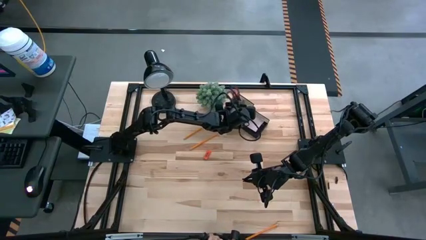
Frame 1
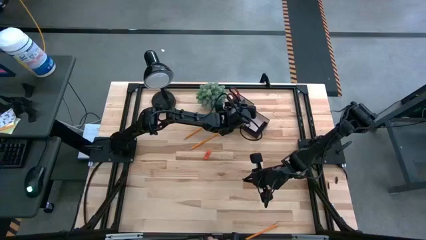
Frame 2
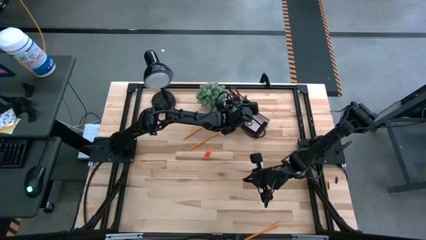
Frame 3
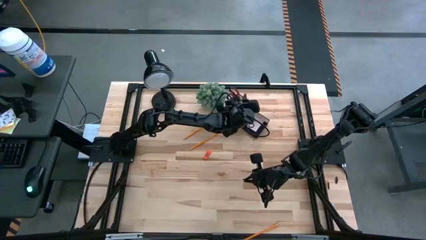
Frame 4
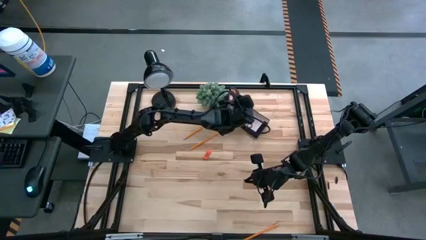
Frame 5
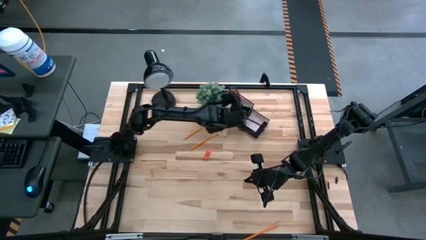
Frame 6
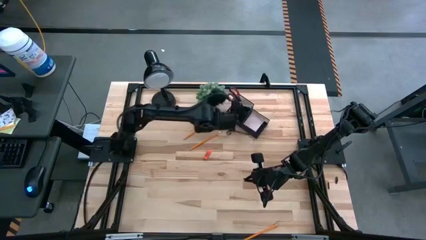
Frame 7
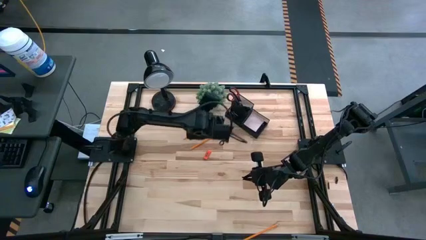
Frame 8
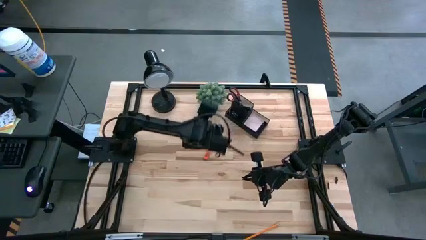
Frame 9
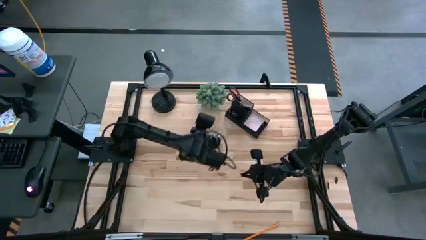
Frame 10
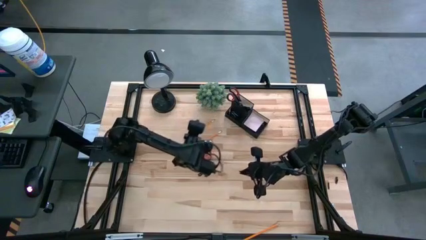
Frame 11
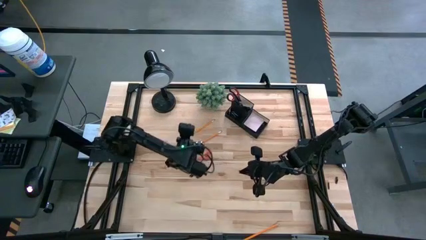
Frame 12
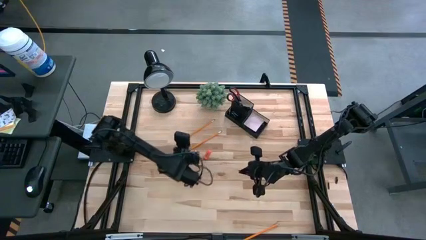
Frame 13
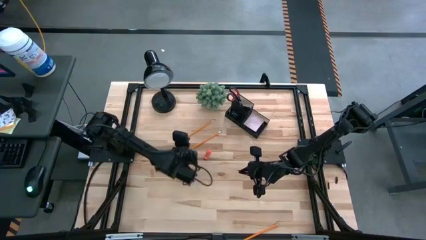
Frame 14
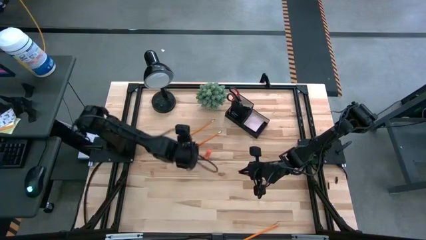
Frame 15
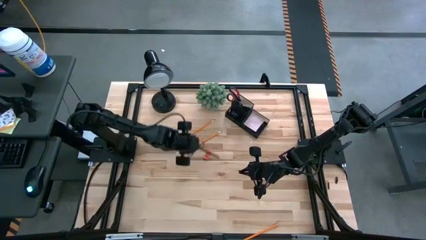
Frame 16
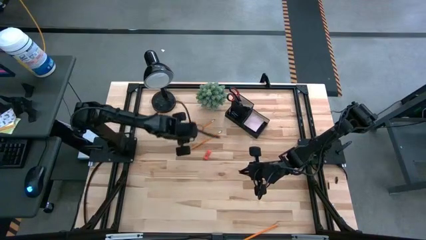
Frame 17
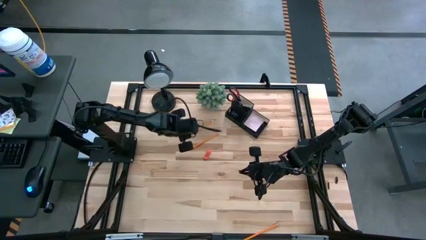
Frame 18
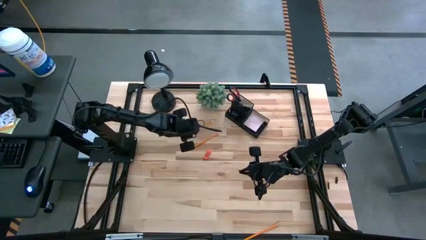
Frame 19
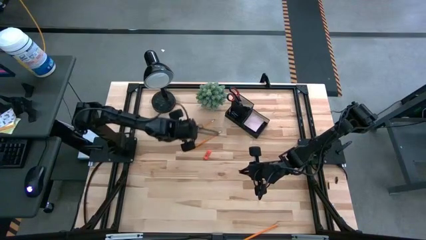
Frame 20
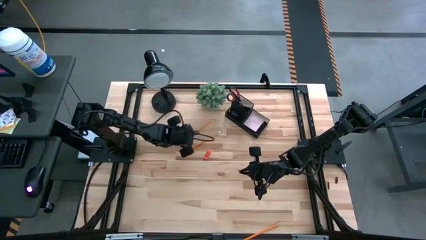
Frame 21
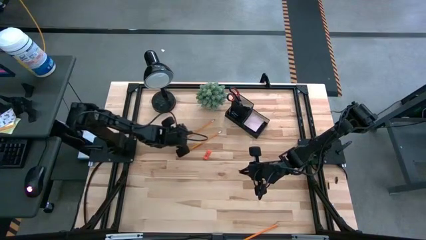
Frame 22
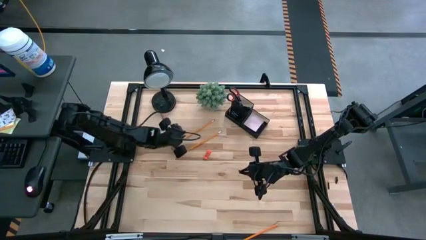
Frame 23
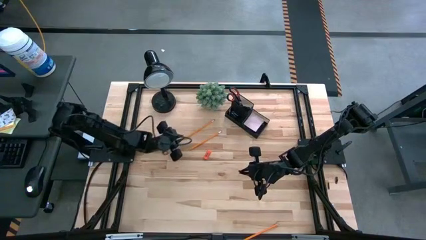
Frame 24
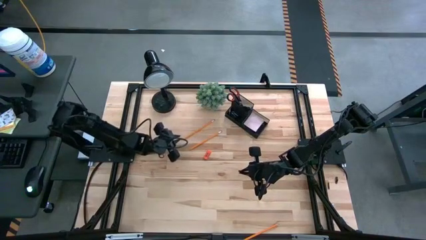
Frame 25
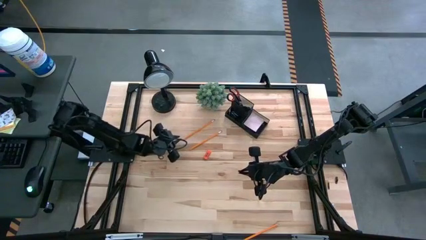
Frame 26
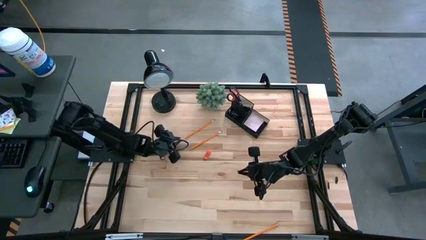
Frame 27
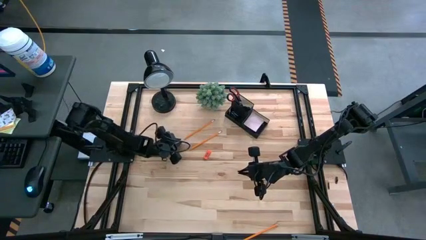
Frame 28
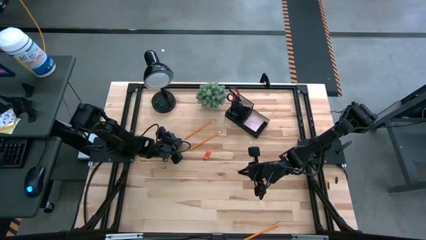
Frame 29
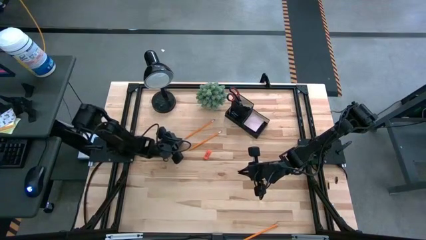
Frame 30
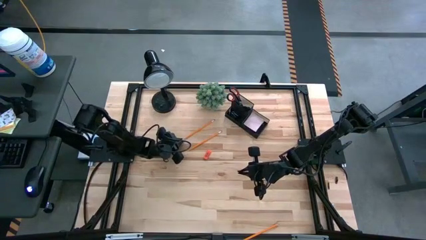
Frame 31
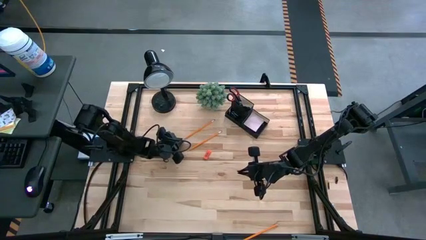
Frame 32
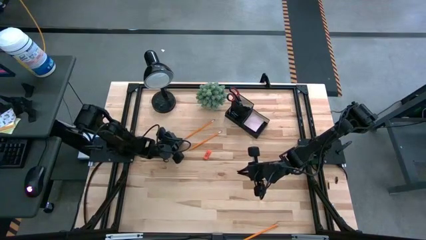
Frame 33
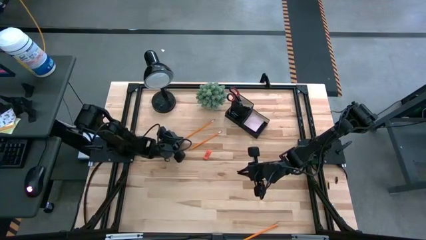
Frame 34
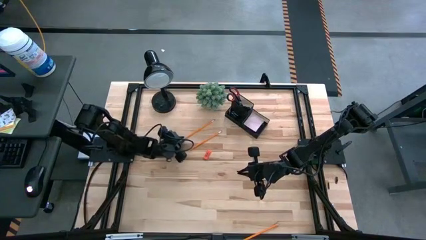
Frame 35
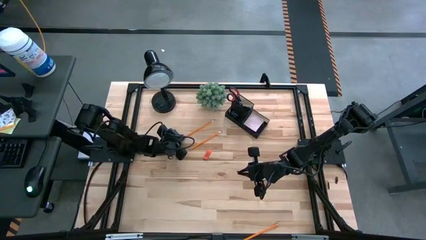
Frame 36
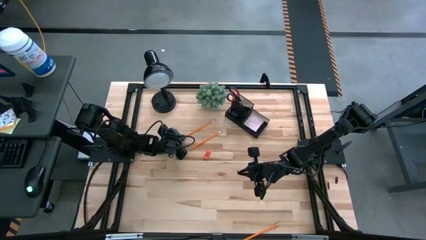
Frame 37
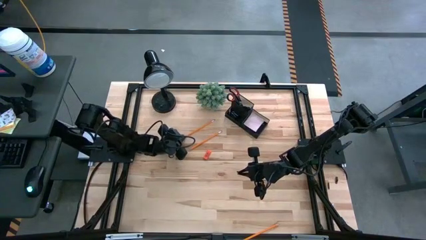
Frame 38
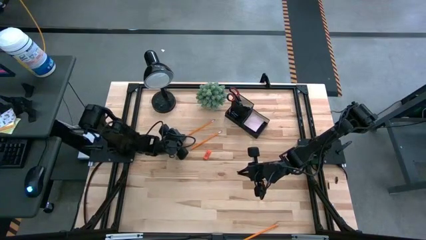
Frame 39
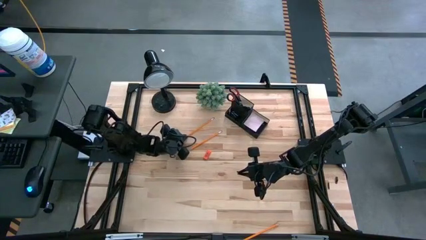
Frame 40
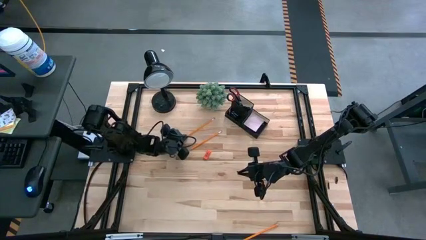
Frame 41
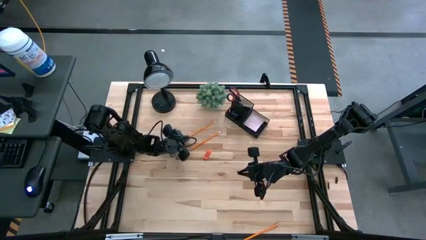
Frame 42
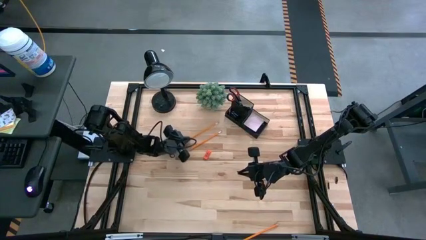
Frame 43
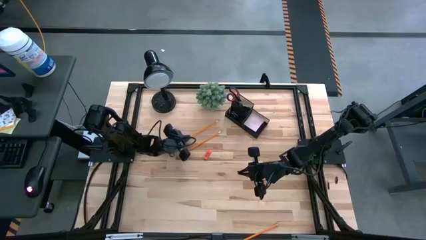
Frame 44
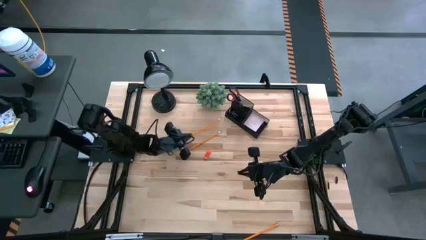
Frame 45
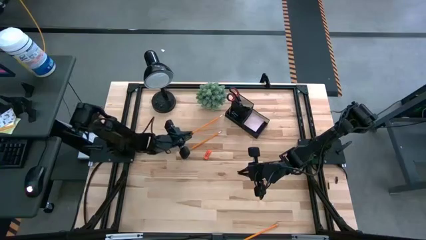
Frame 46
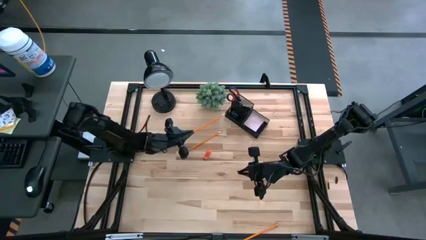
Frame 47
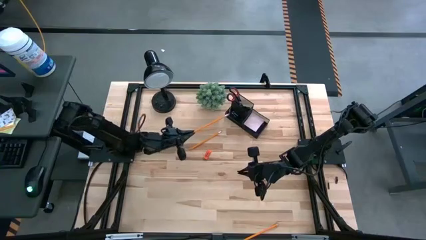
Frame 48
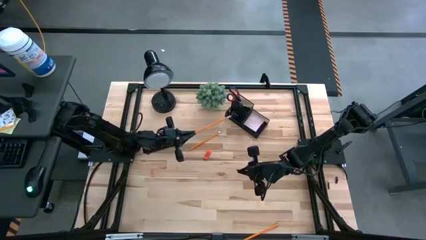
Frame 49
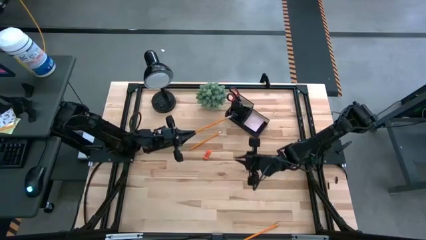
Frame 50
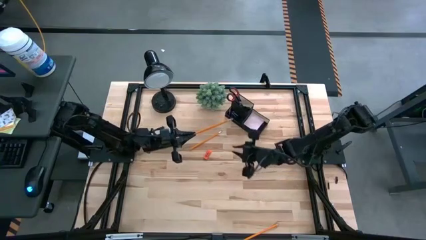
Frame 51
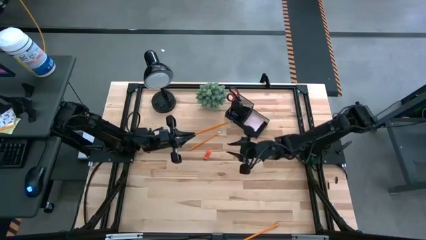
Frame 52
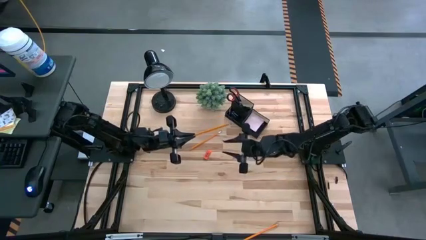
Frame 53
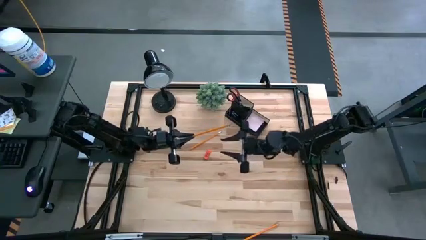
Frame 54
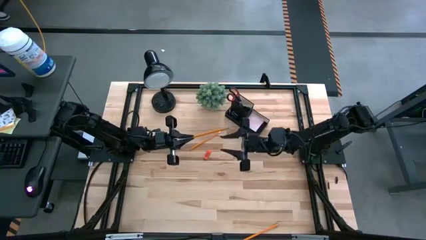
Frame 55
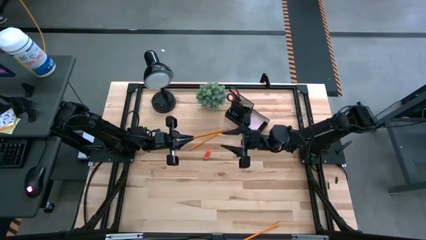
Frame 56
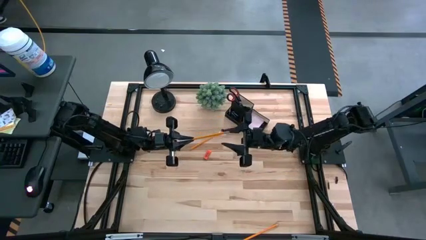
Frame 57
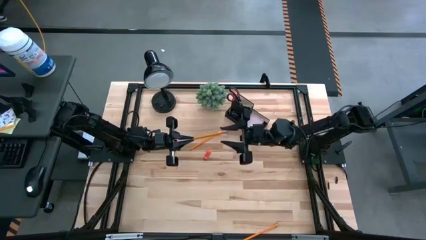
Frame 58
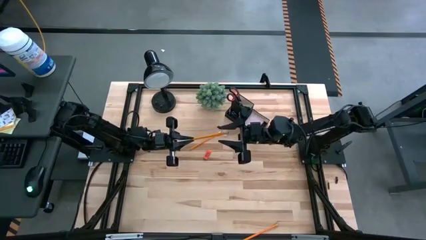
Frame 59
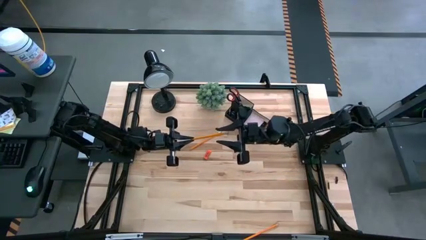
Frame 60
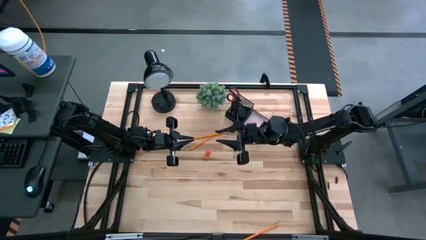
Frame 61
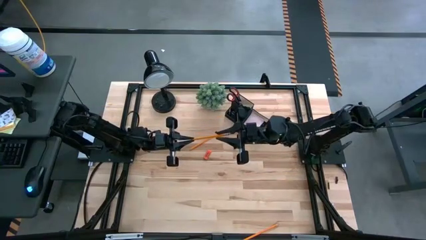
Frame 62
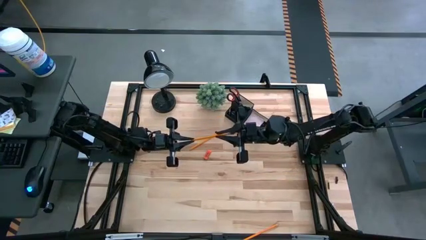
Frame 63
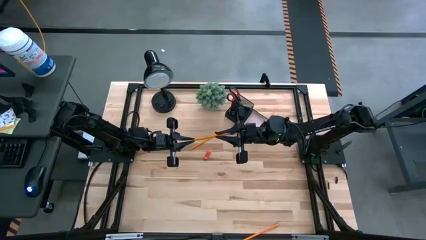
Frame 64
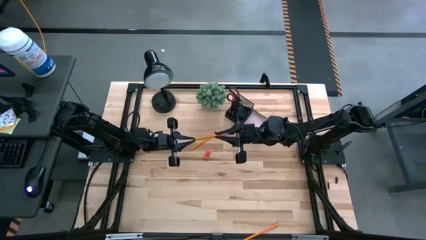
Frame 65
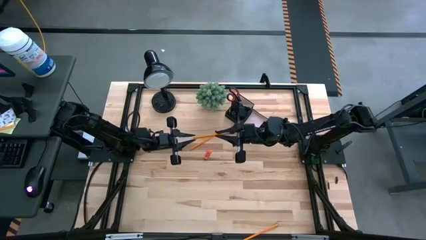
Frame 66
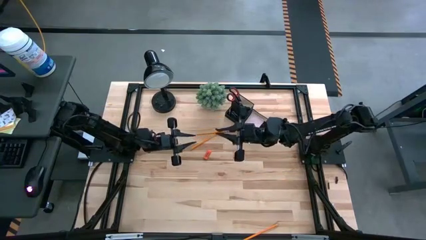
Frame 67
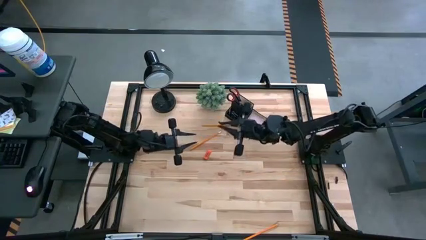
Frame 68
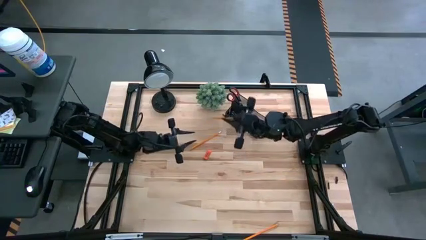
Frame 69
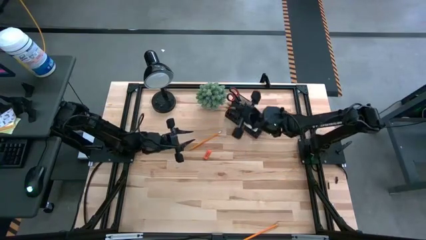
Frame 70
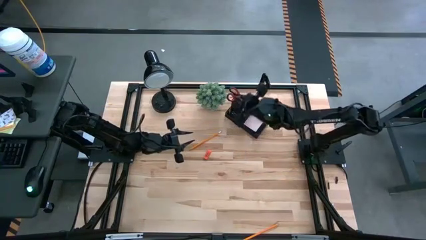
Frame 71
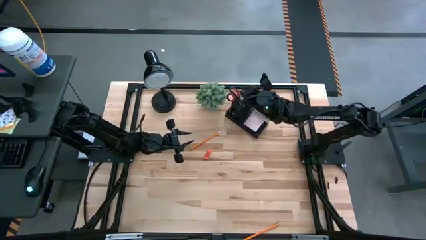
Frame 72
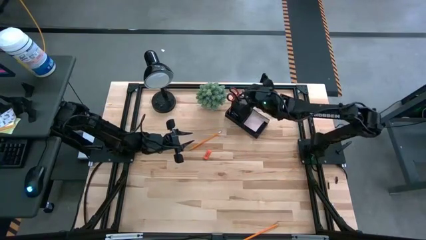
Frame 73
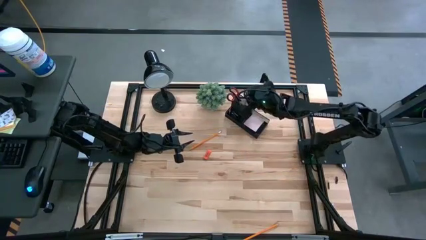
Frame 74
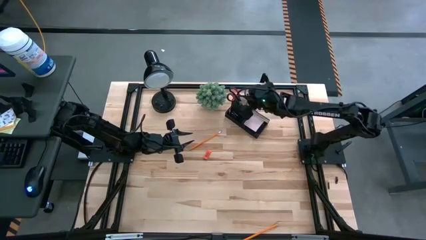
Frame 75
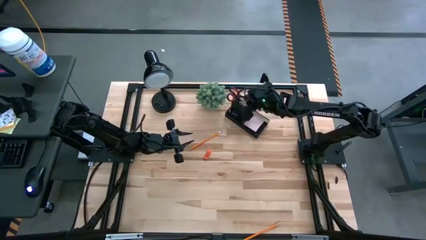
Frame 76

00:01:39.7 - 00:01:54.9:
Task: Pick and place office supplies into organizer
Put the top left yellow pencil into the black desk organizer

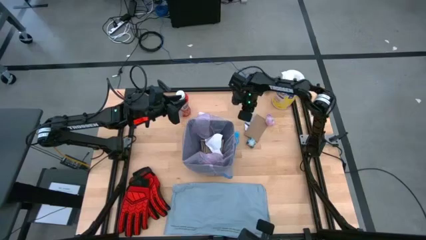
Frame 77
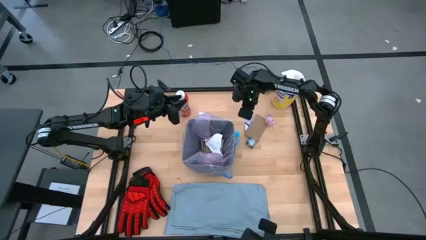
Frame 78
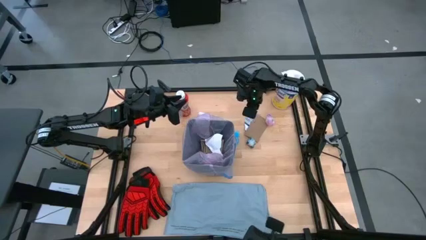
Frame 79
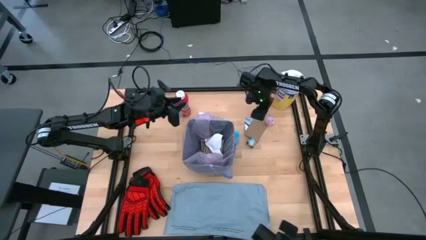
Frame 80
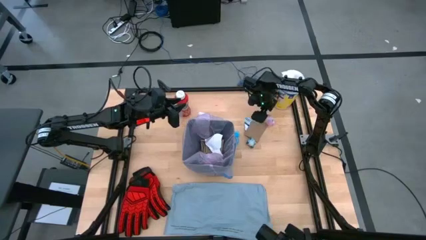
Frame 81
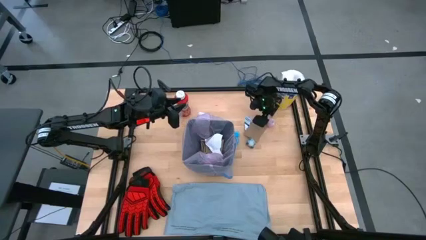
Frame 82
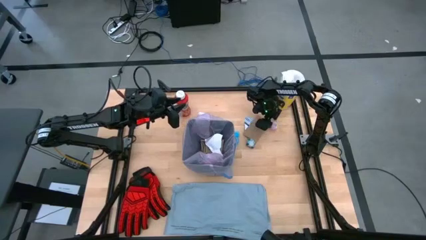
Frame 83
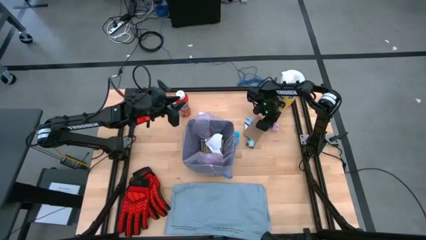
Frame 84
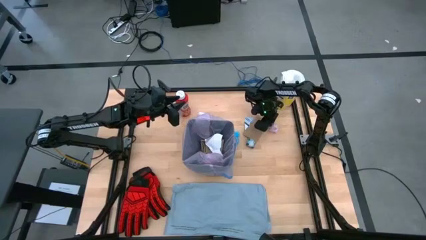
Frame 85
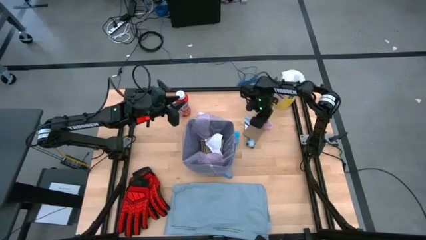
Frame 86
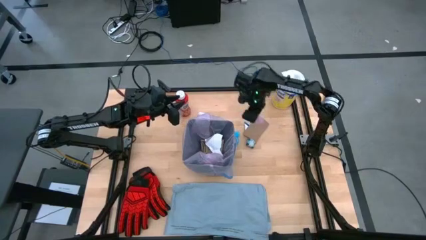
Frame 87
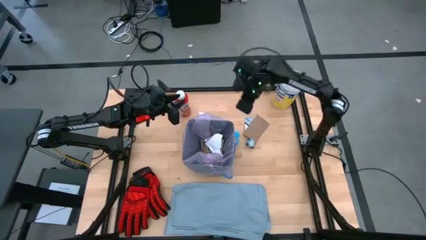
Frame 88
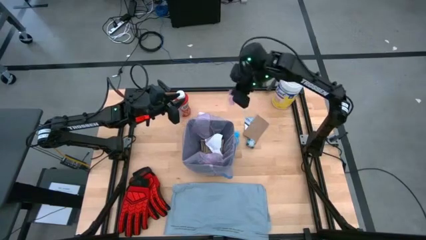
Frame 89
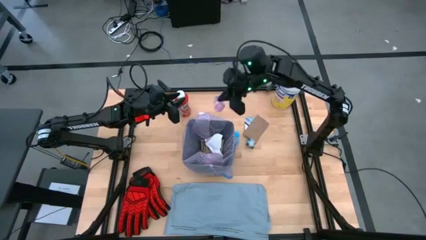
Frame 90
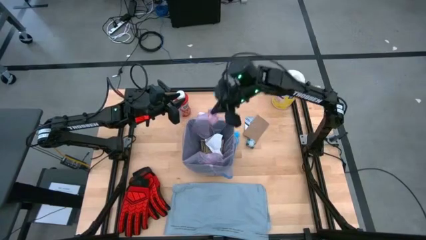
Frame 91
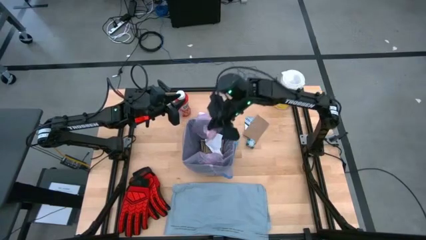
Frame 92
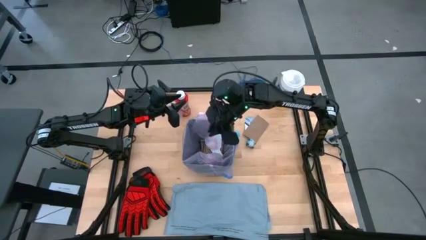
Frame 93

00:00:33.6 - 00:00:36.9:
Task: place trash/remove bag and relplace
Put the pink plastic material into the trash bin
